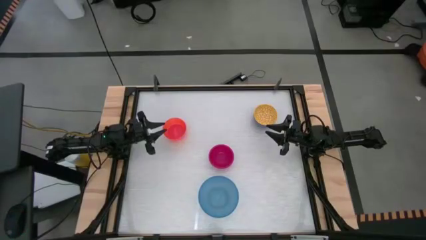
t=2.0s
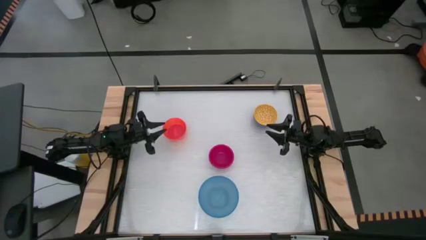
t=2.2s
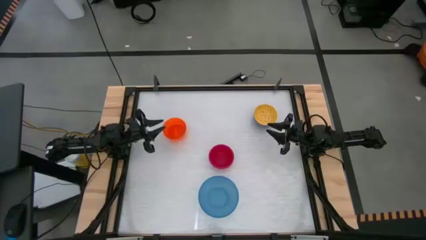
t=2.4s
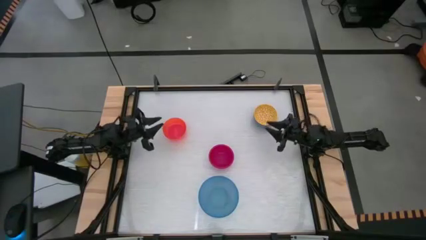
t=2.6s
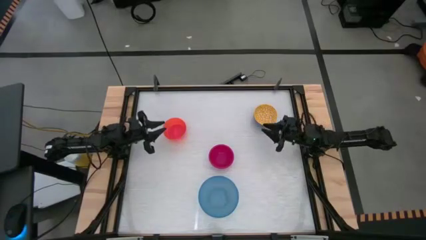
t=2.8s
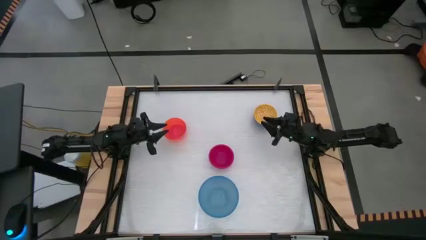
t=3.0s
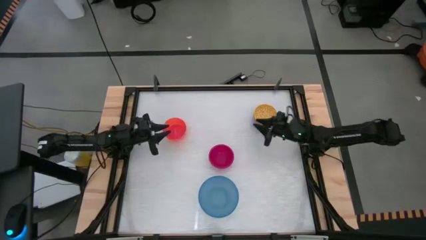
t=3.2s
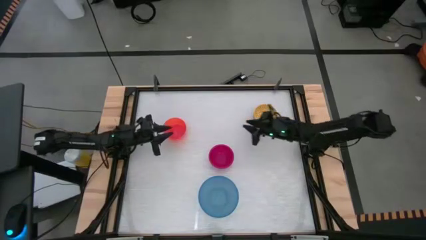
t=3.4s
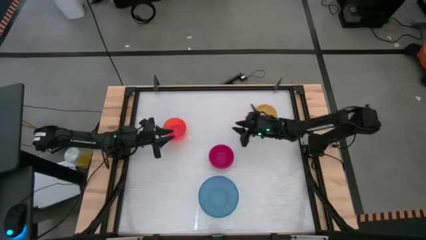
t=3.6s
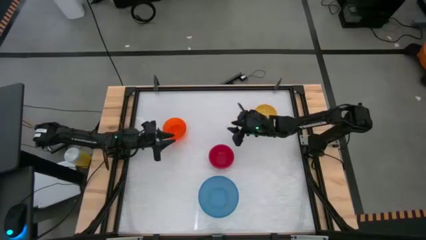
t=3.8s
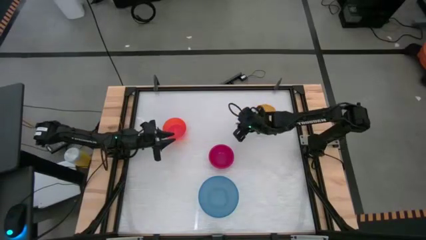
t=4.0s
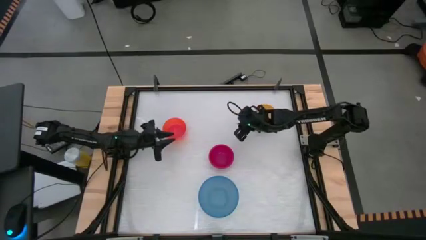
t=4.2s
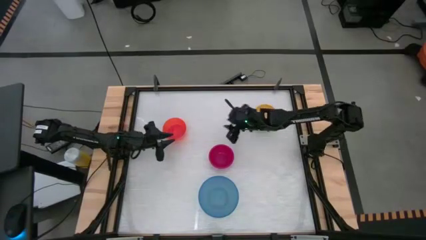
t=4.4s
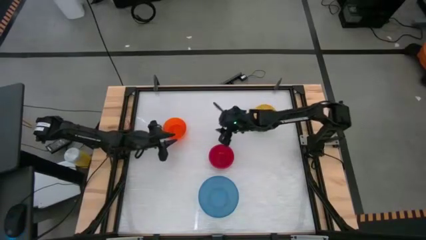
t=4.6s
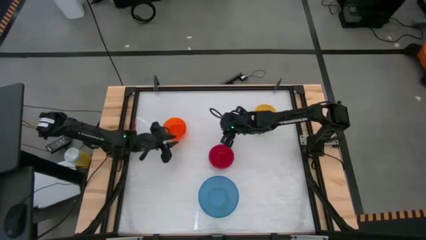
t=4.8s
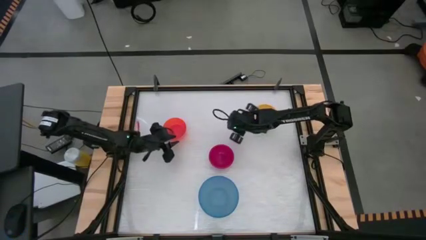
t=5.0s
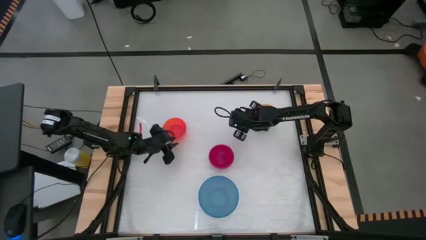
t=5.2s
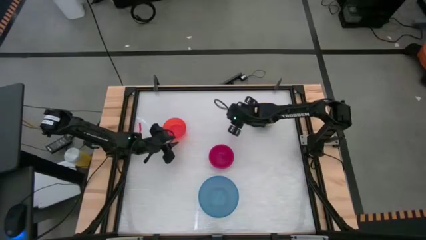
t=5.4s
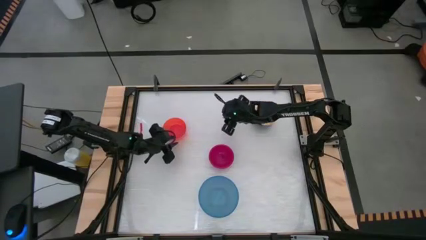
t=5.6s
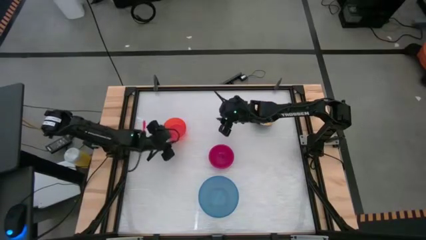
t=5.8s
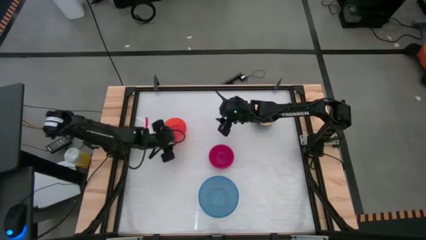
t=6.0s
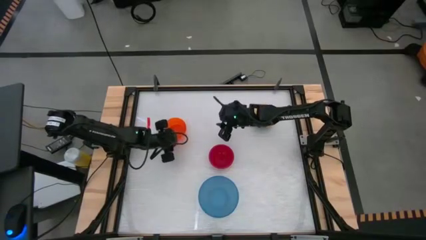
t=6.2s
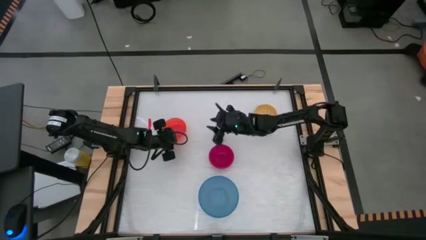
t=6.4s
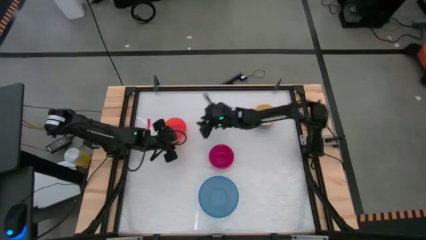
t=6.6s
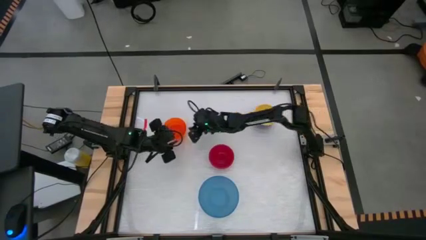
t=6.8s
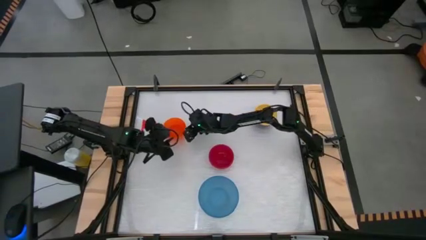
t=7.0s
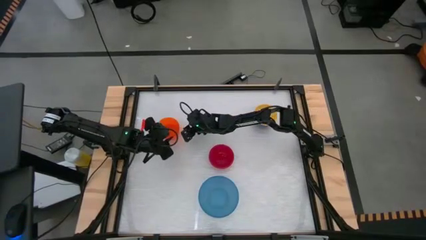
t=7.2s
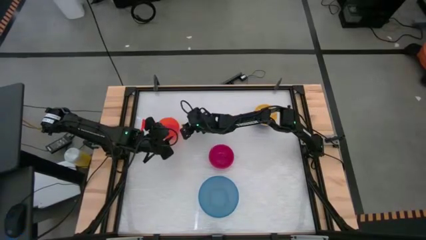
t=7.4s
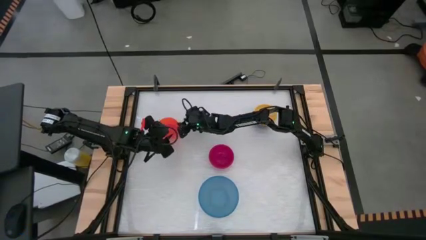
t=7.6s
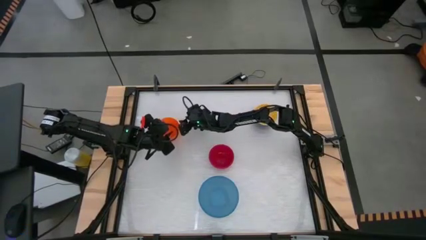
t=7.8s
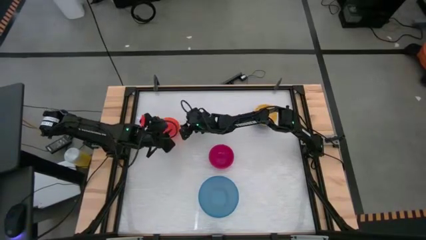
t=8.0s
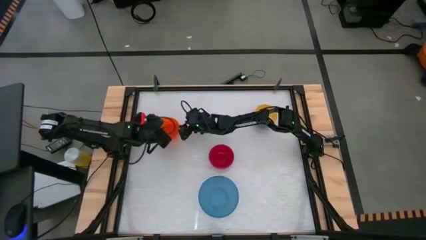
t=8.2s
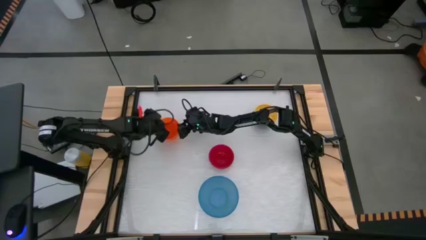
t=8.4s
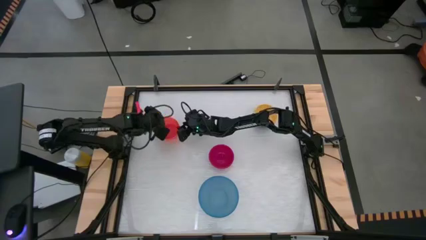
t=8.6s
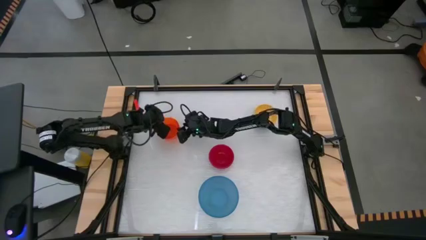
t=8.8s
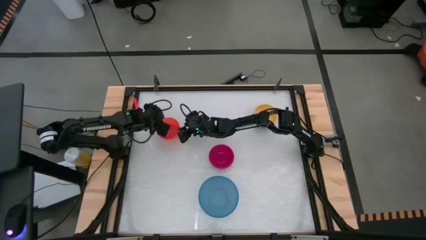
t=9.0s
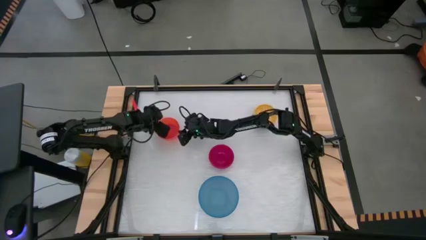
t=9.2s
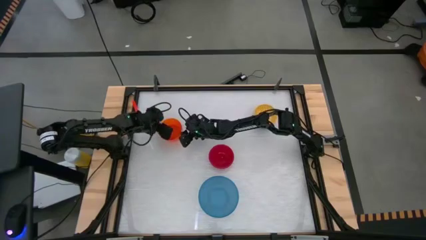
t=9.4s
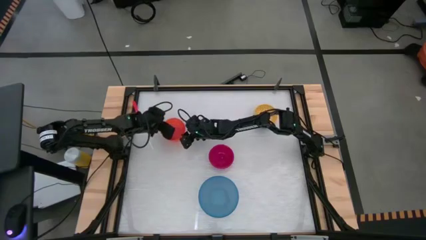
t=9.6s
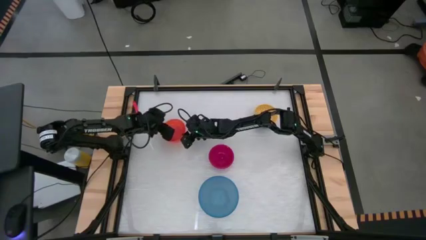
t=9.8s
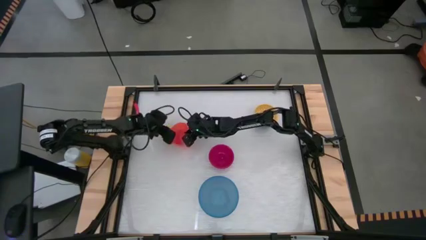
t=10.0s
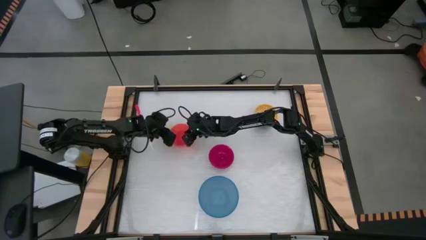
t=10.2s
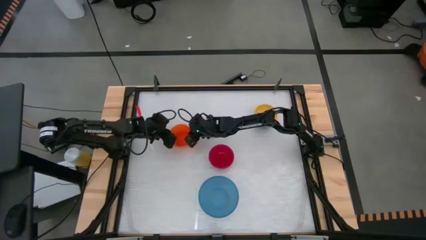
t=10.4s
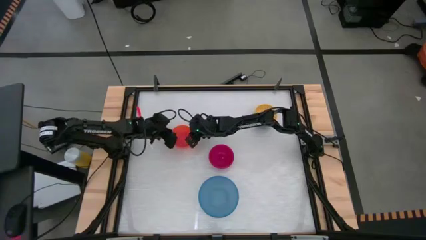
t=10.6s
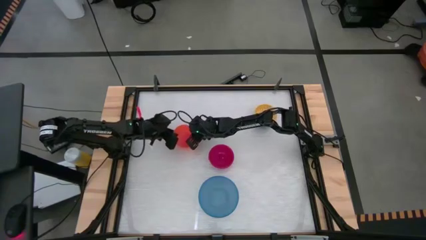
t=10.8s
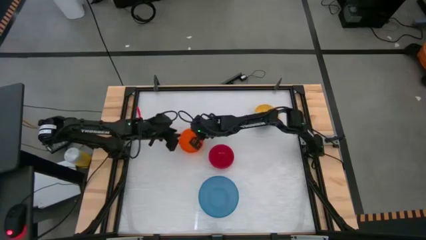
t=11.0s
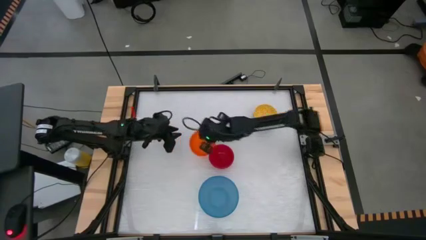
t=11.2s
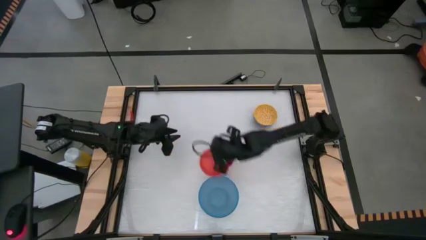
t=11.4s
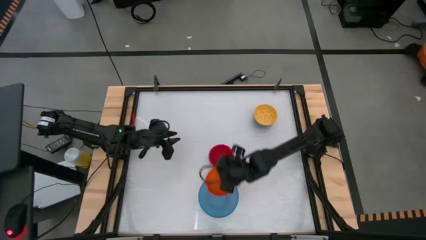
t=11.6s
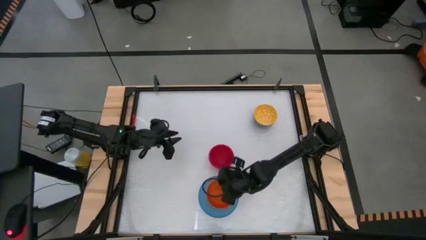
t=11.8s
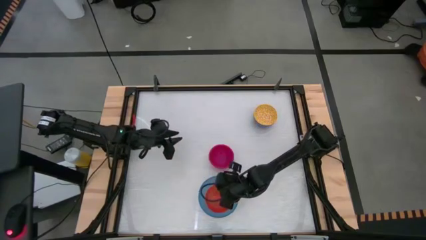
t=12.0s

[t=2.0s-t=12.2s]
Stack the orange bowl on top of the blue bowl

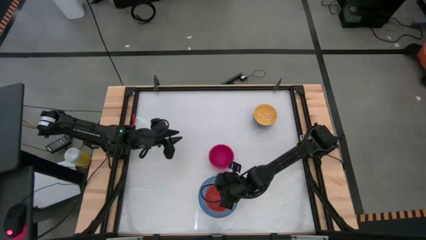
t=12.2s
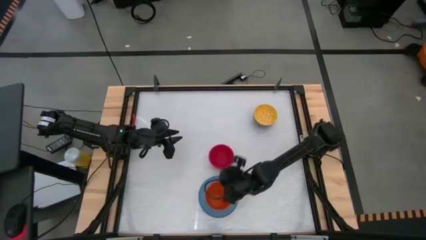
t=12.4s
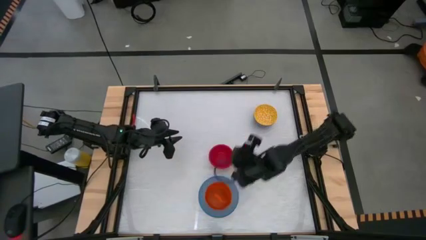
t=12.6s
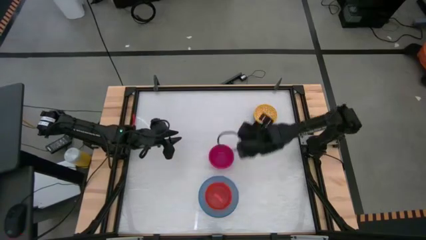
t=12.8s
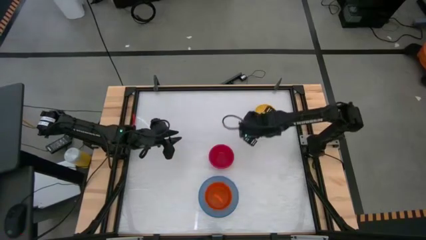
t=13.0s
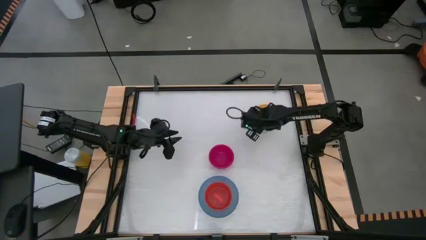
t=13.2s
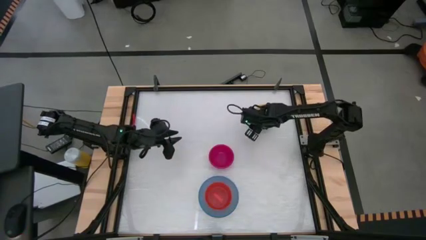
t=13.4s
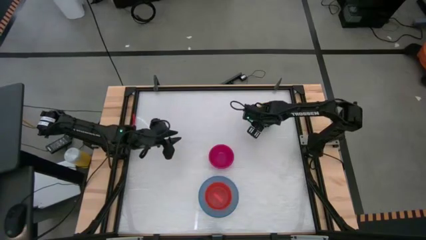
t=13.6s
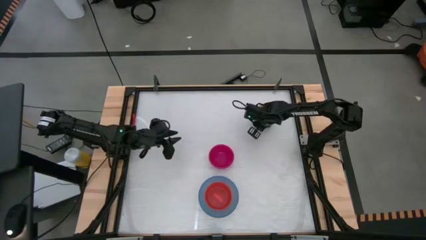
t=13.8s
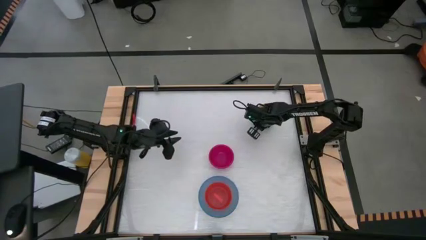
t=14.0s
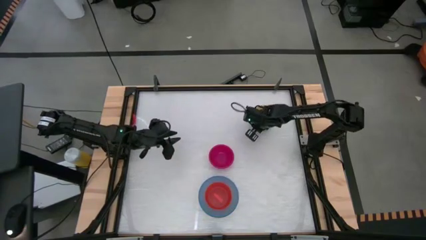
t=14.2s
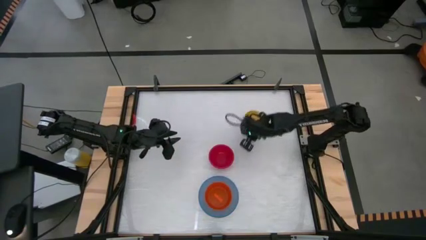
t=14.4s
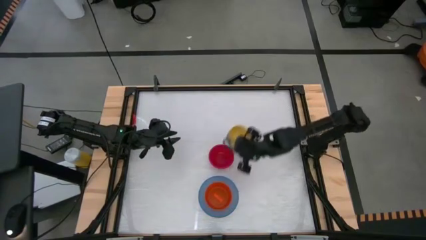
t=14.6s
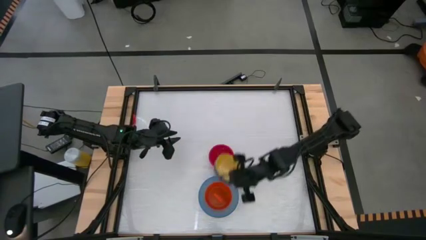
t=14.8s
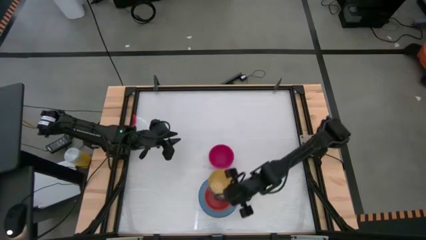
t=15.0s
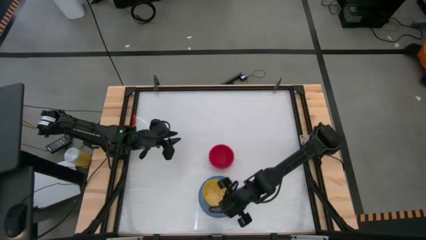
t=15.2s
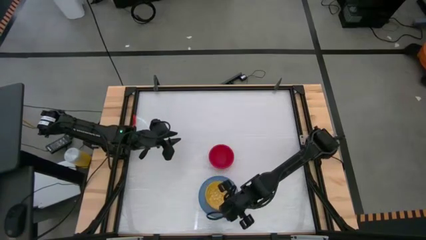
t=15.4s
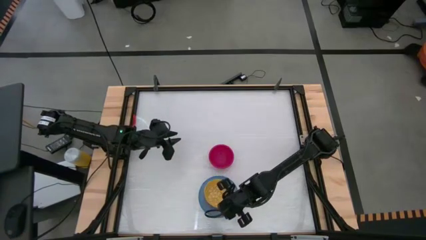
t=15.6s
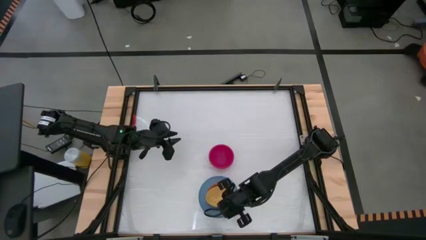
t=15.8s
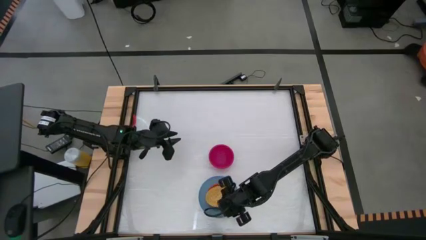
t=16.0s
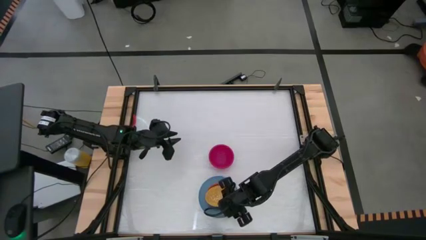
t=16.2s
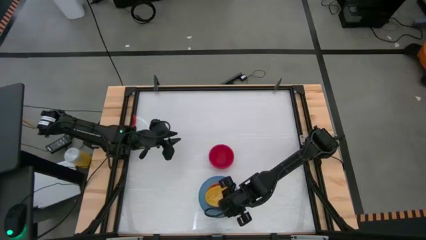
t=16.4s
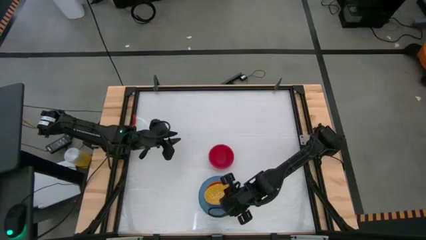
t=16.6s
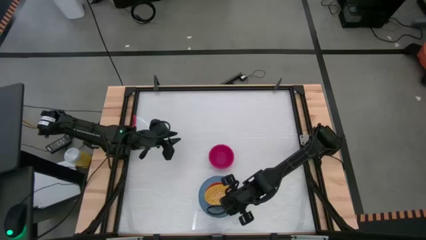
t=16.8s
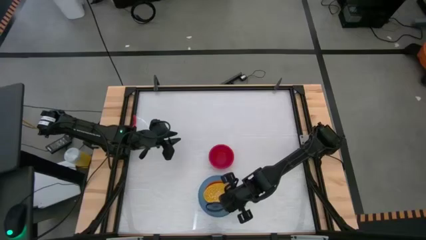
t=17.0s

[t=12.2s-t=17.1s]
Stack the yellow bowl on top of the orange bowl

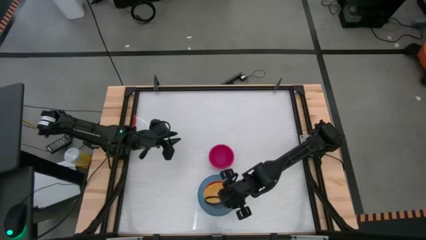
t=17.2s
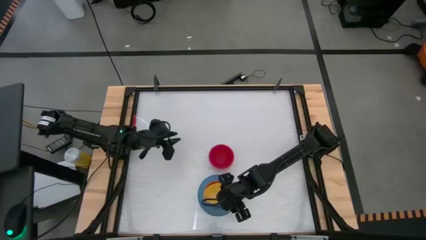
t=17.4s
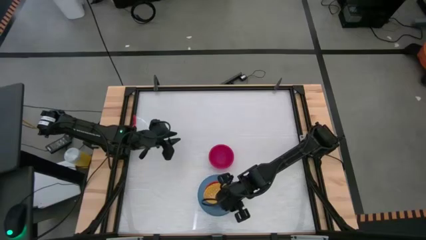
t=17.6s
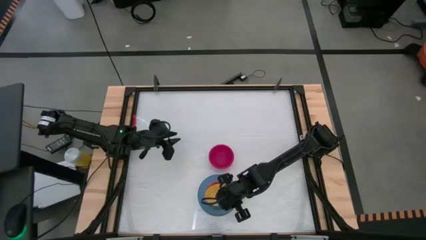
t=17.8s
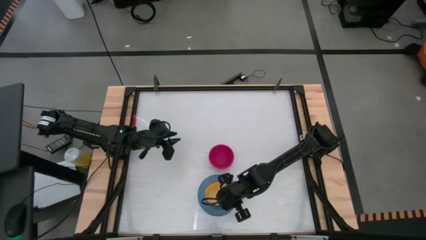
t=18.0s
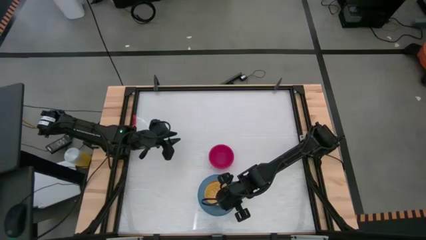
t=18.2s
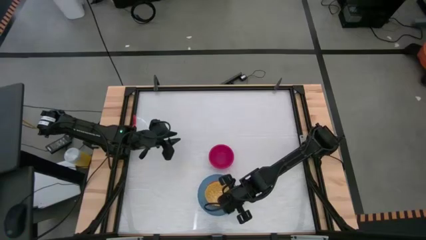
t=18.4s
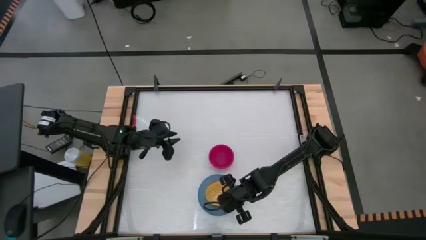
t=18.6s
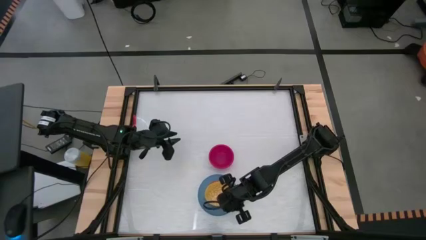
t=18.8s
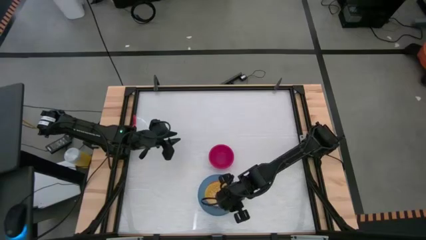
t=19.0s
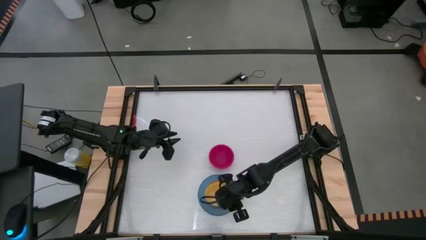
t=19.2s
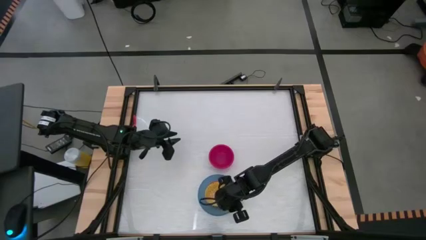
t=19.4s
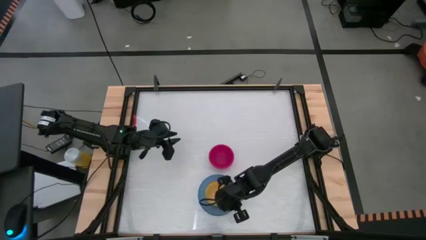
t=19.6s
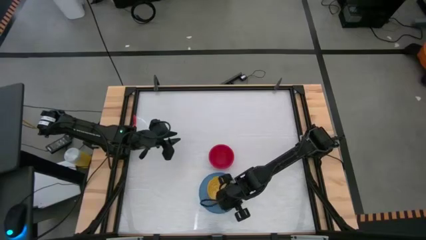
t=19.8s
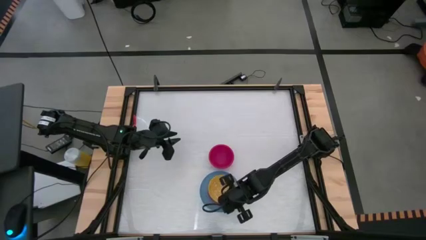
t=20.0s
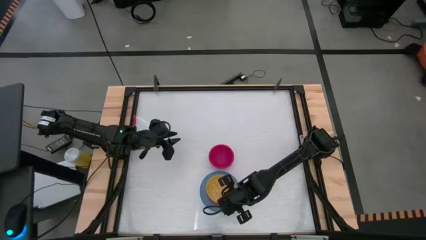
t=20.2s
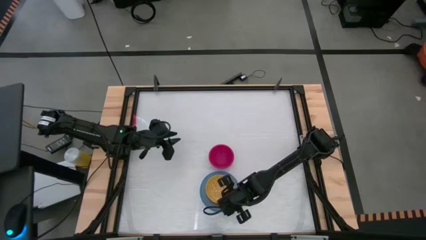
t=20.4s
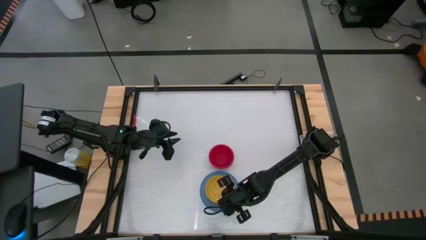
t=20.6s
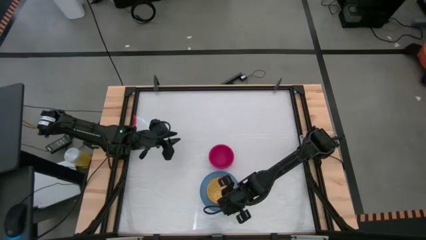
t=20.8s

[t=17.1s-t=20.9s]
Stack the yellow bowl on top of the orange bowl
